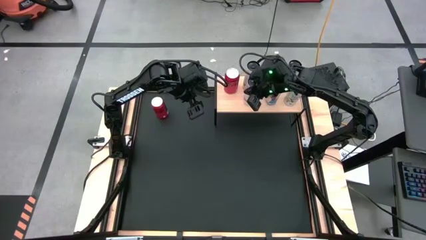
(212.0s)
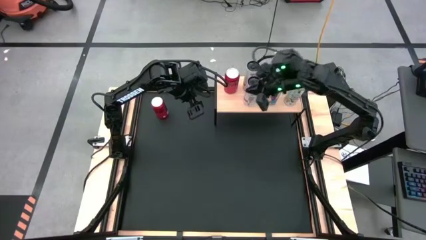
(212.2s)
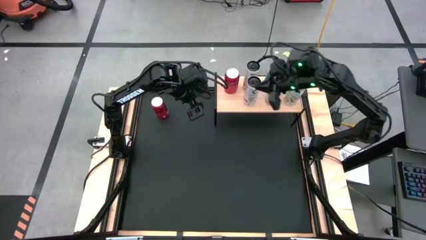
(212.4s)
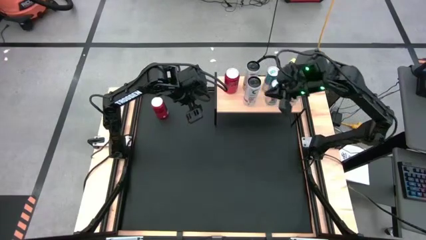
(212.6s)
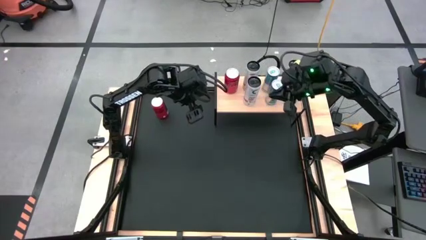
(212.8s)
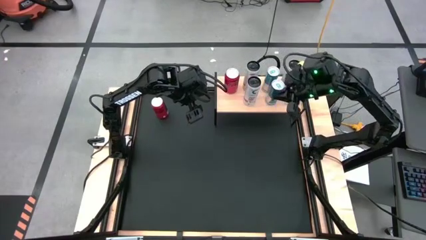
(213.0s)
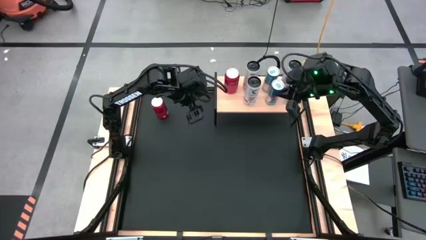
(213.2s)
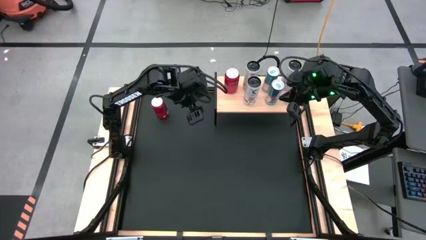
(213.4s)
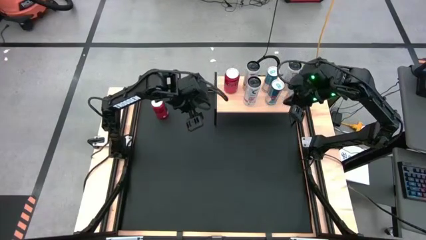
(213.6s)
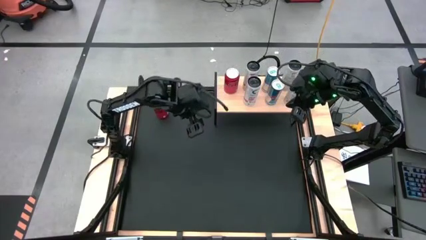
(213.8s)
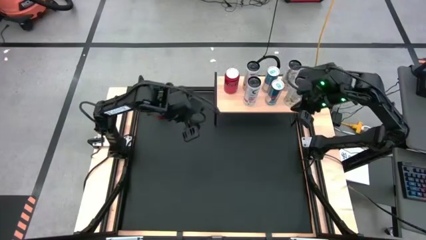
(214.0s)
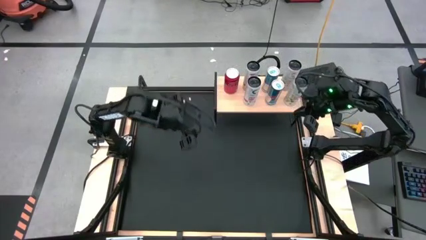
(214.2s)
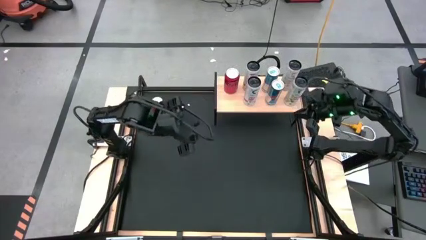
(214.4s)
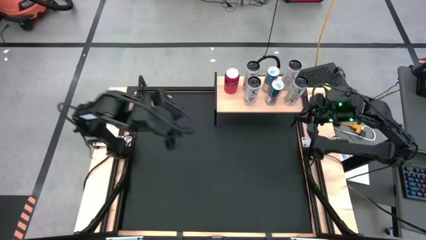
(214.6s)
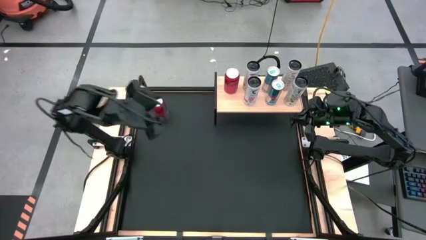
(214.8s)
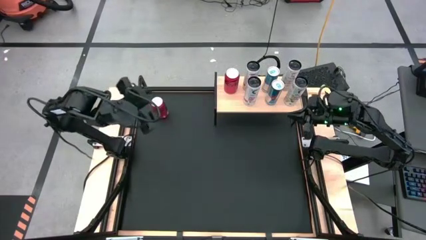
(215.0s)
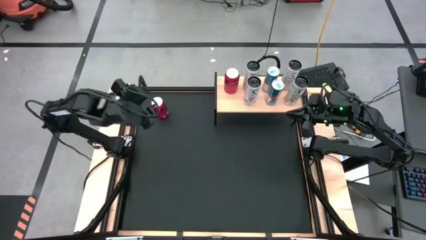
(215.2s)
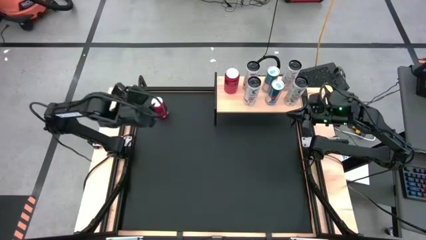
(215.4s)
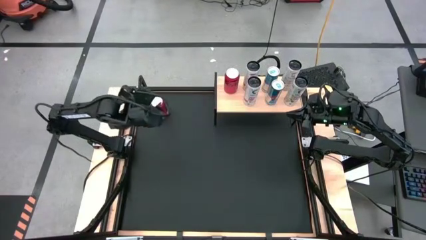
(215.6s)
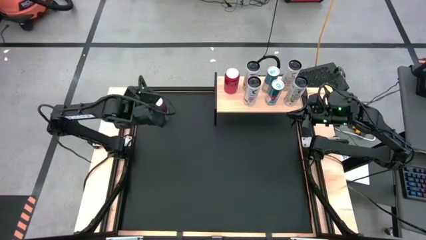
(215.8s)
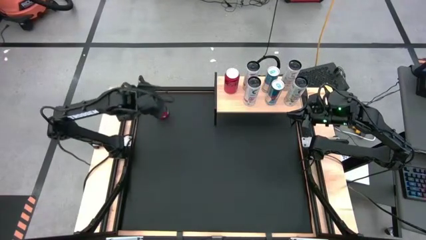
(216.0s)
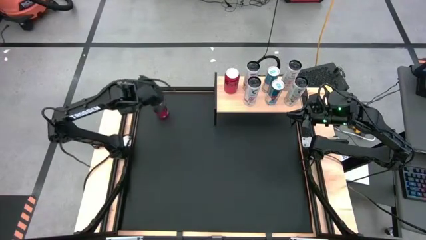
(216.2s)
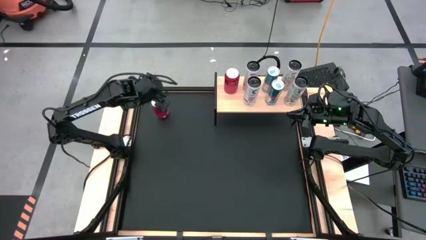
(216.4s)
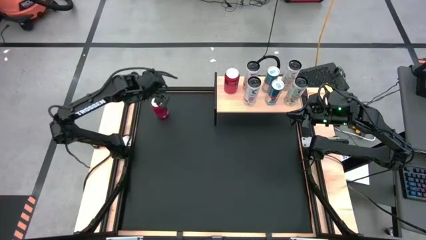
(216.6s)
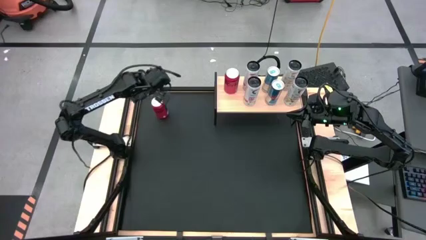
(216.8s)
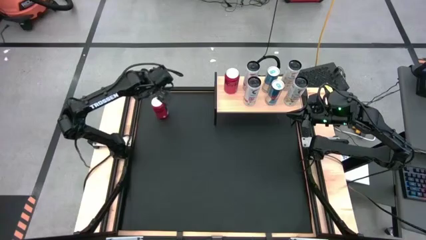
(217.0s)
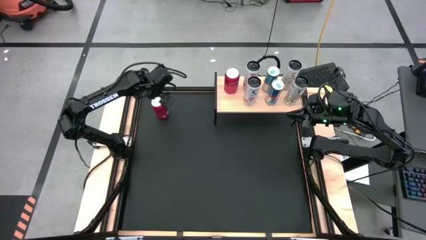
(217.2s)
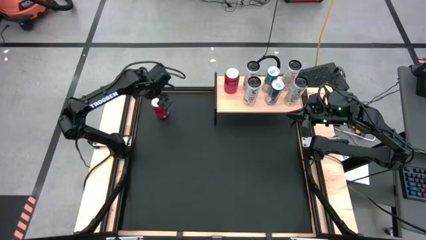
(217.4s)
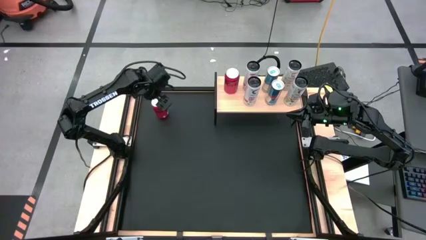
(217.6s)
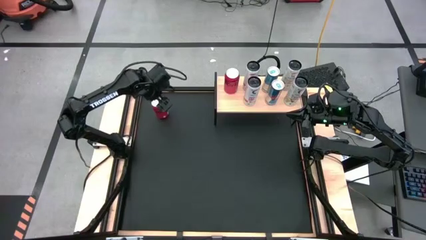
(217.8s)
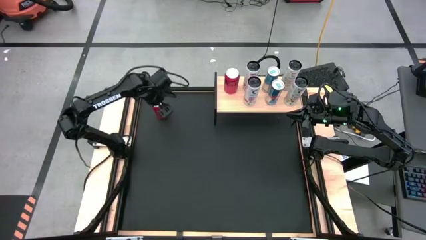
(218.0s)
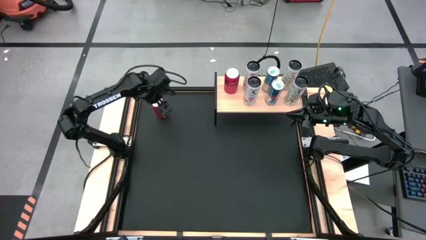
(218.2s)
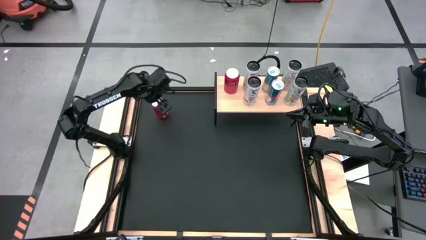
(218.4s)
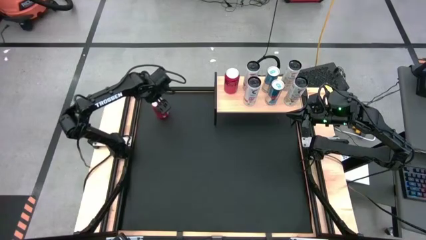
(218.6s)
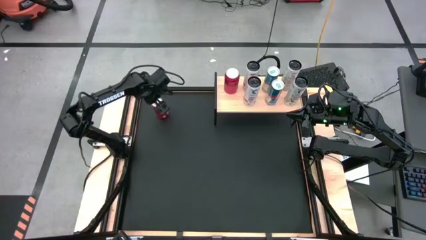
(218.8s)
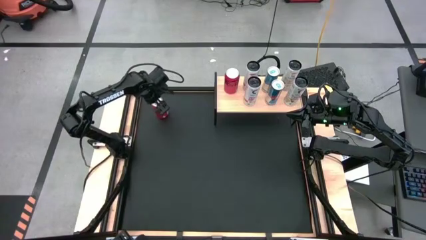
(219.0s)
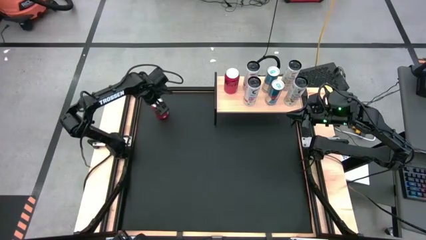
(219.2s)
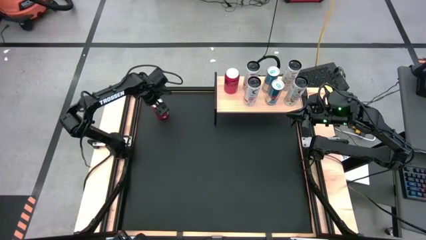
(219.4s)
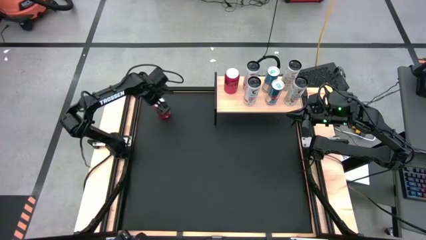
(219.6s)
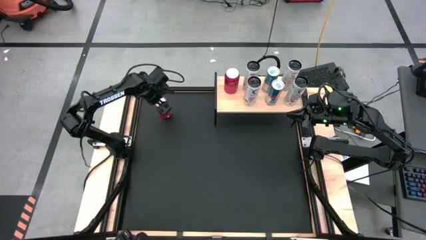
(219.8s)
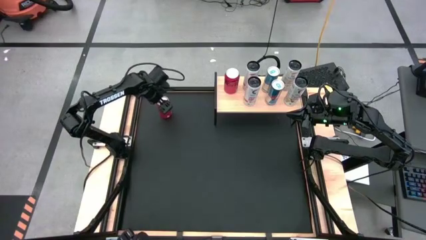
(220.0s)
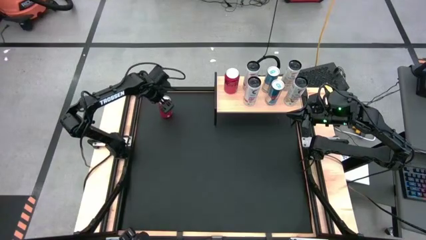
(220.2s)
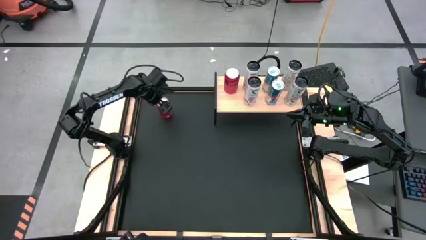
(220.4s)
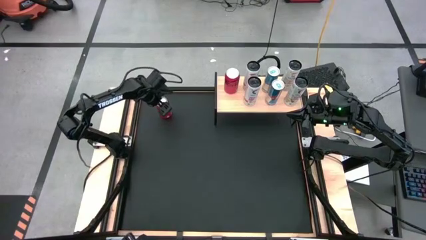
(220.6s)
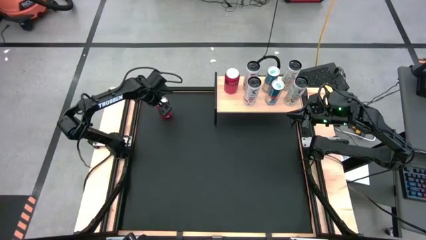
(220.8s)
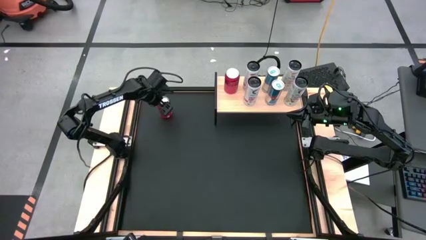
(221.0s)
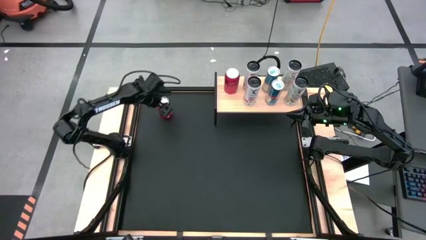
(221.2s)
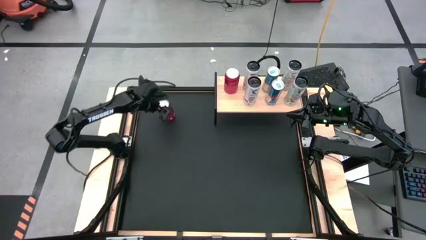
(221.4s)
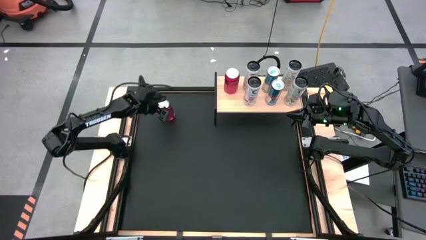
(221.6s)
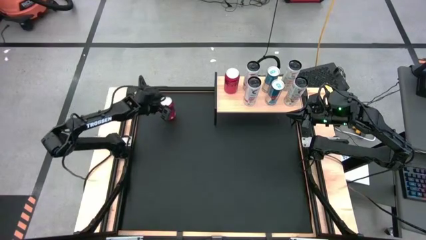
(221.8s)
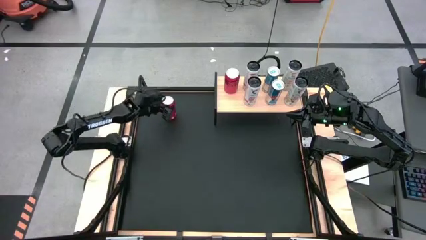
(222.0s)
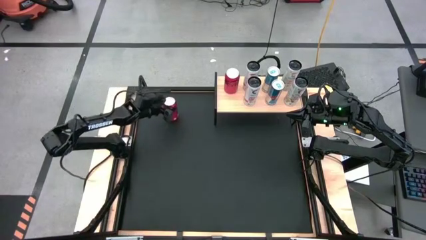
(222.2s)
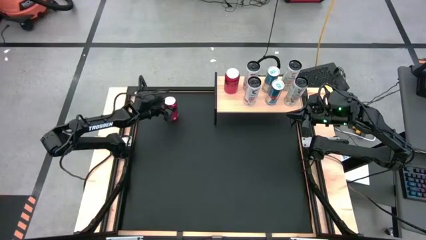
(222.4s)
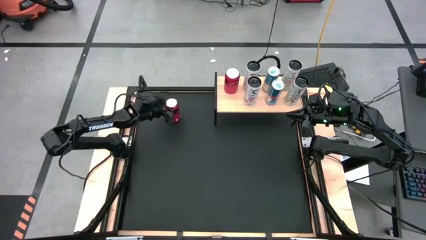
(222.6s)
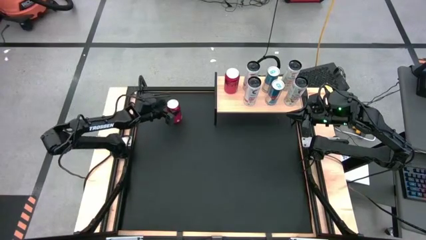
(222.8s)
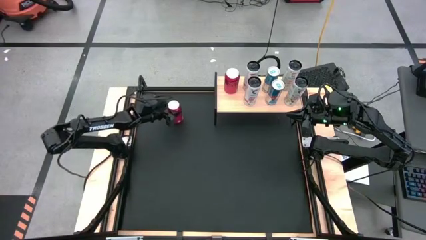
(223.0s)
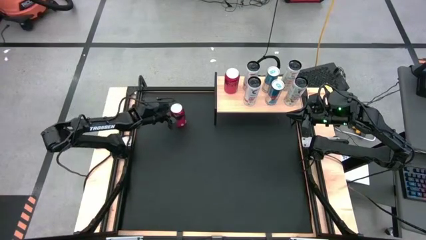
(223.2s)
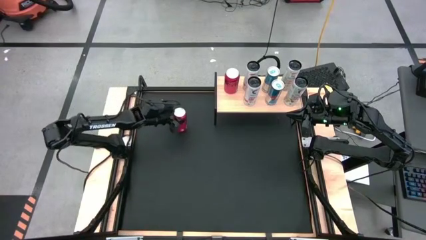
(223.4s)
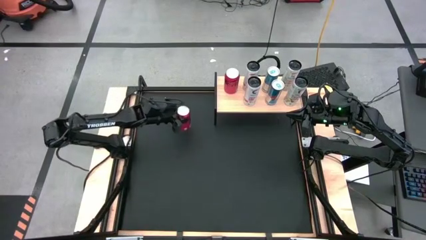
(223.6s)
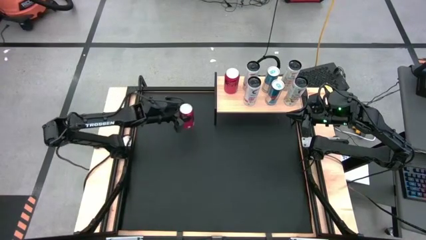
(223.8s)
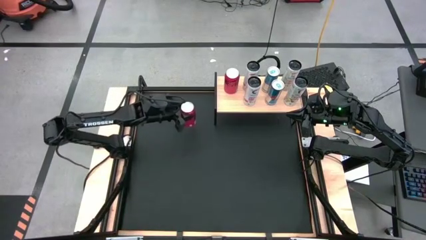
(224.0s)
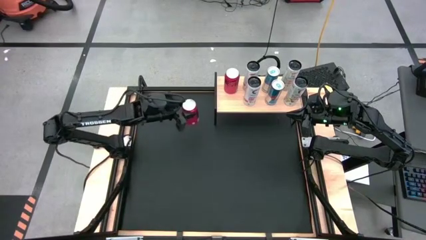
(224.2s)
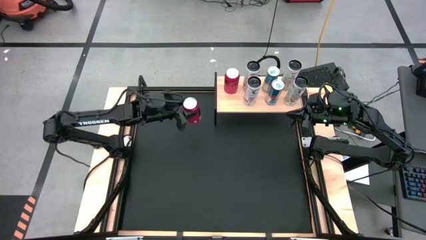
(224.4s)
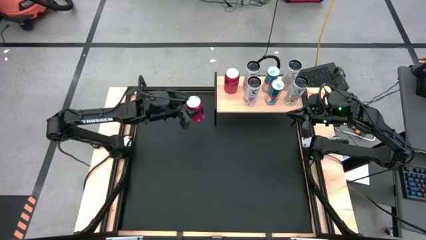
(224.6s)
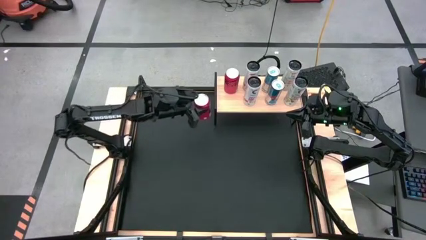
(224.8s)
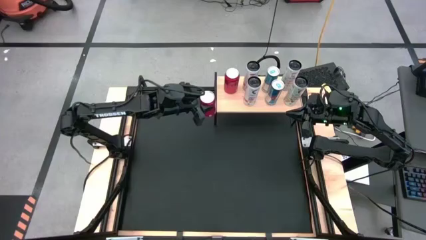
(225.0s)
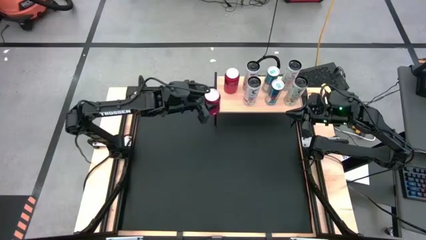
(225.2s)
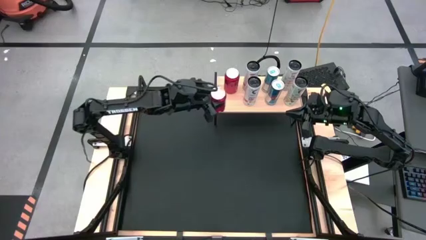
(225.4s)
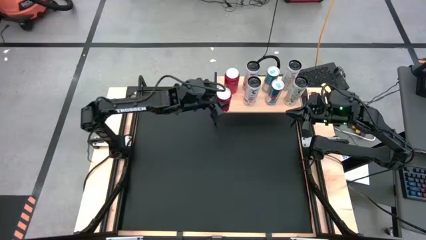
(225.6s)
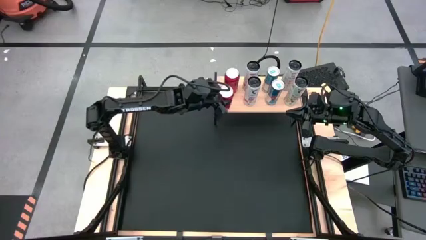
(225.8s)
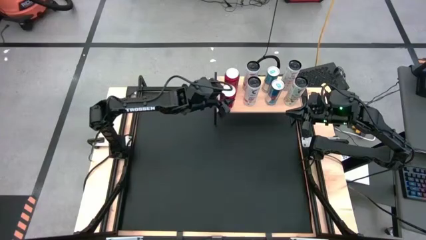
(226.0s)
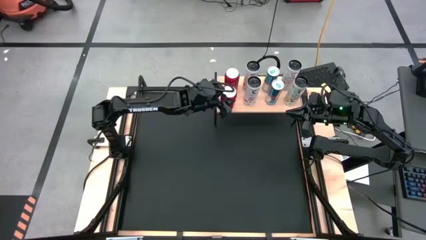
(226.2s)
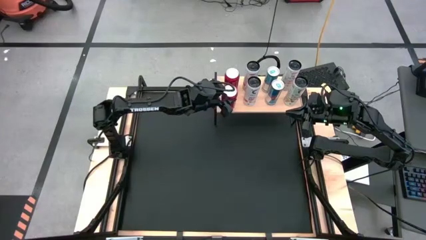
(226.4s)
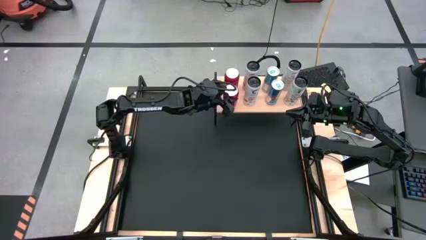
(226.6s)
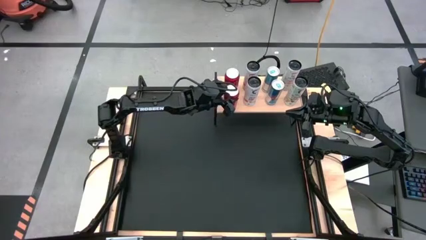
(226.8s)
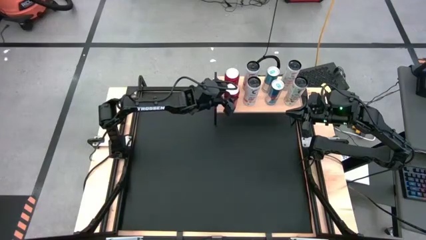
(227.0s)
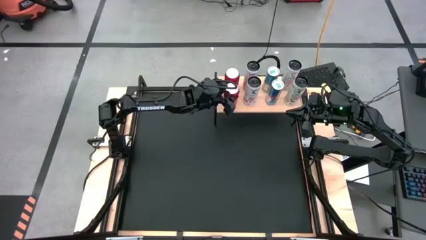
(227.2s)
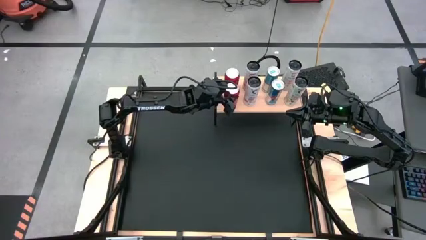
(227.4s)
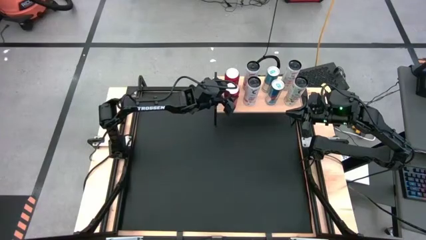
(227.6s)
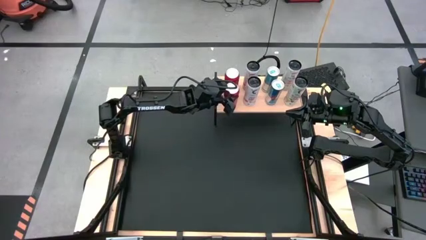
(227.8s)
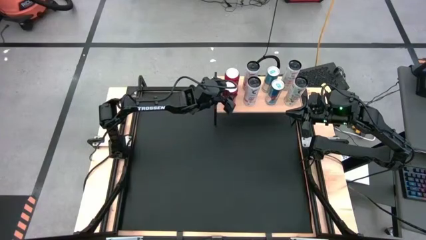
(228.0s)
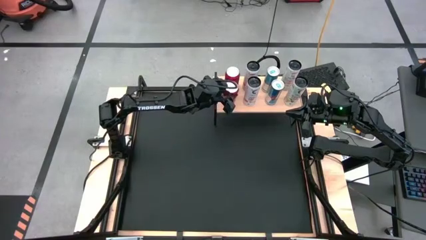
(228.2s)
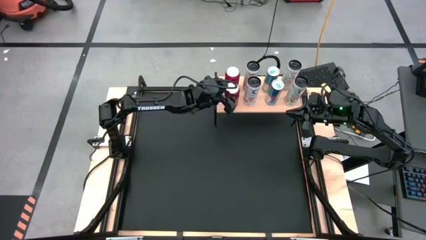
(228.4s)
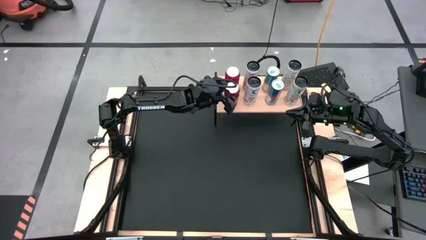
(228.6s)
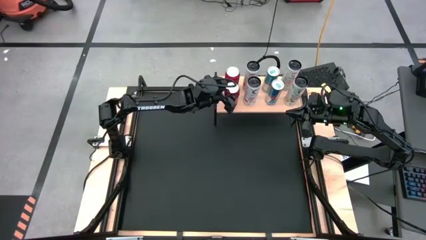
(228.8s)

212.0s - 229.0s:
Task: Place canned beverage on shelf
Put the red soda can on the shelf aligned with the other red soda can
